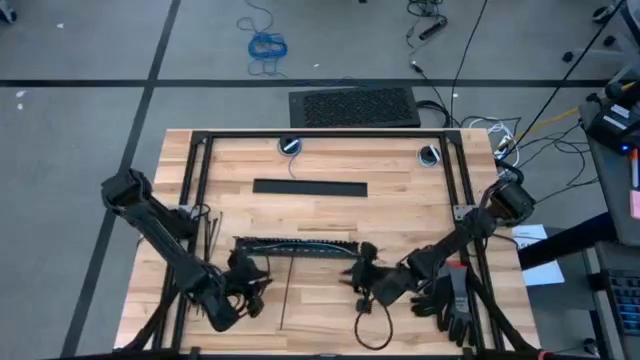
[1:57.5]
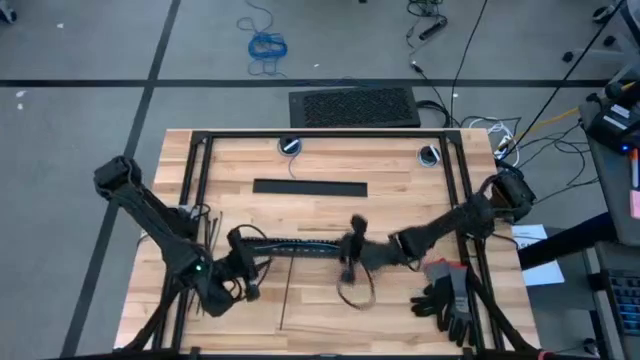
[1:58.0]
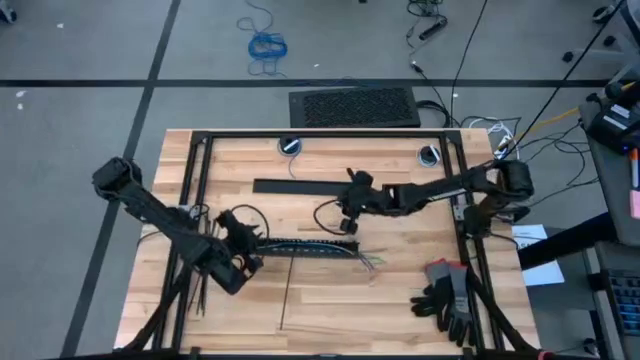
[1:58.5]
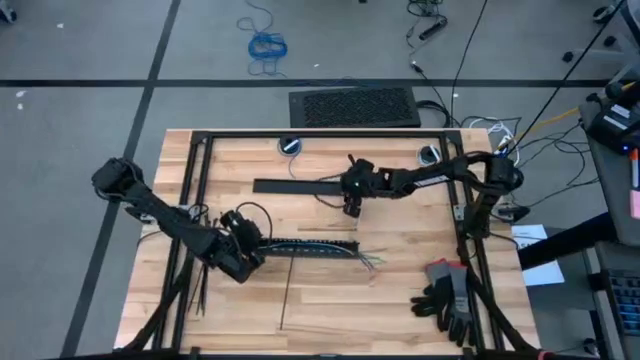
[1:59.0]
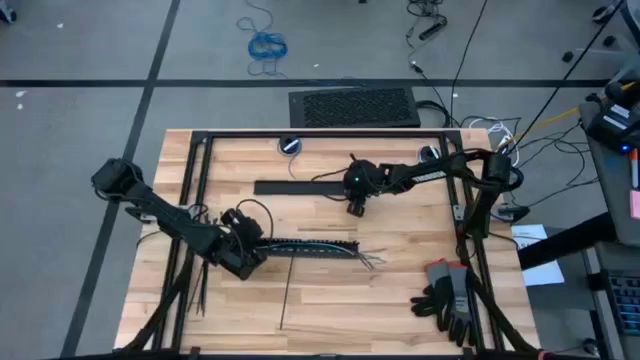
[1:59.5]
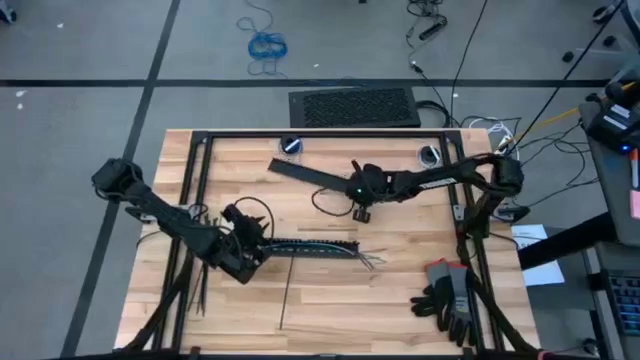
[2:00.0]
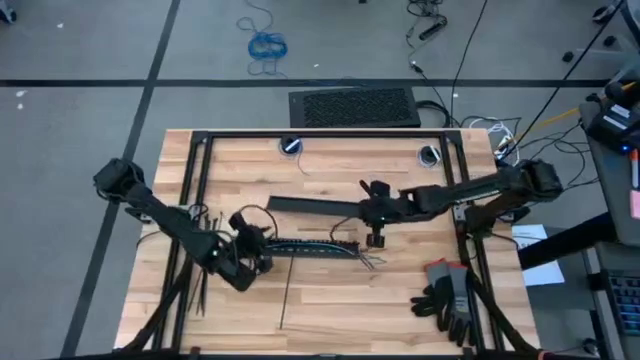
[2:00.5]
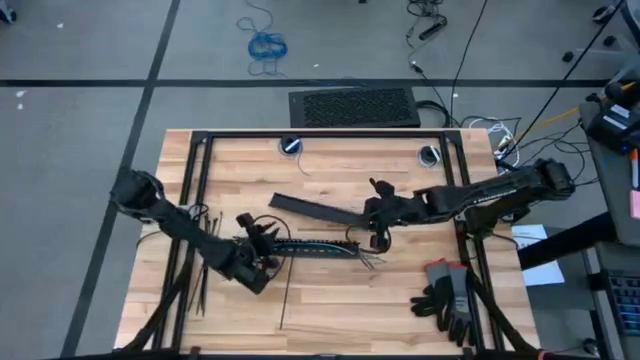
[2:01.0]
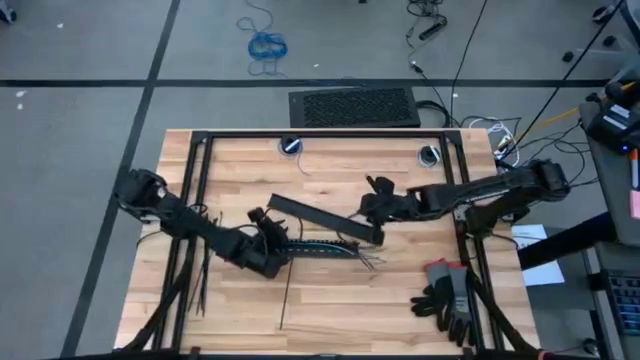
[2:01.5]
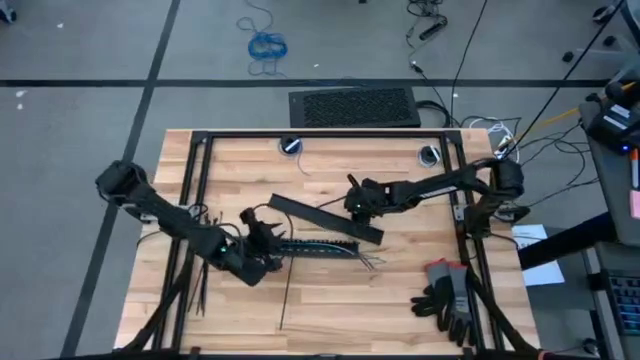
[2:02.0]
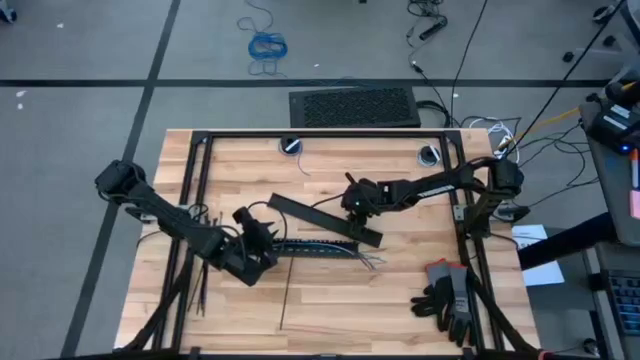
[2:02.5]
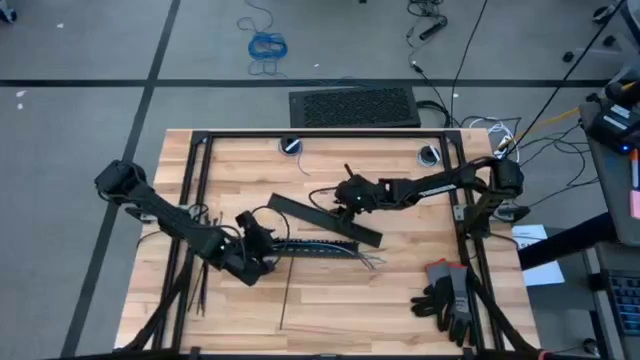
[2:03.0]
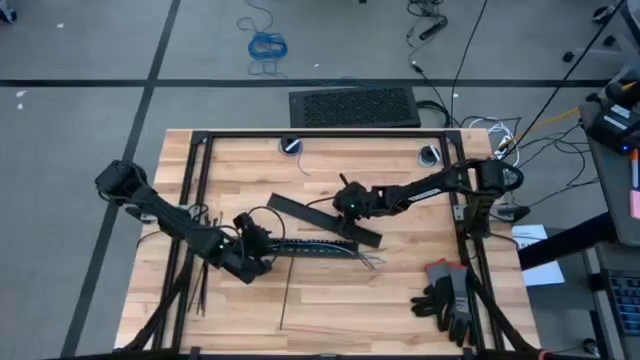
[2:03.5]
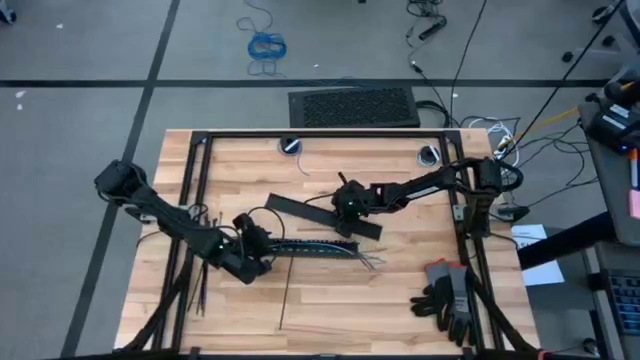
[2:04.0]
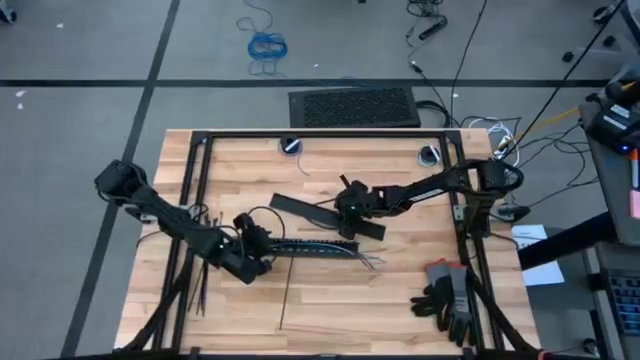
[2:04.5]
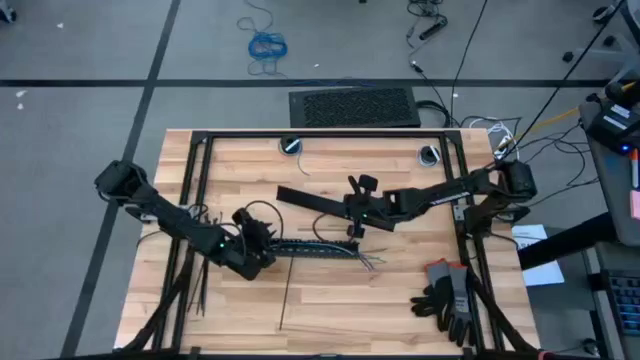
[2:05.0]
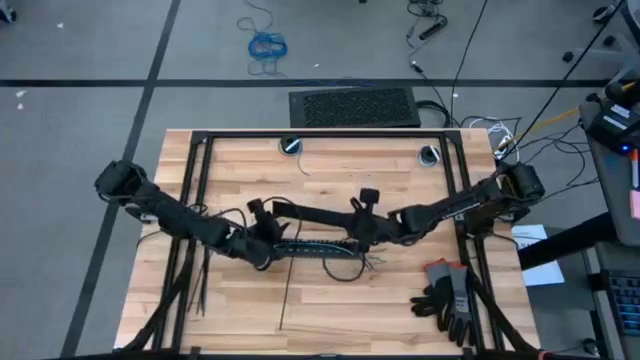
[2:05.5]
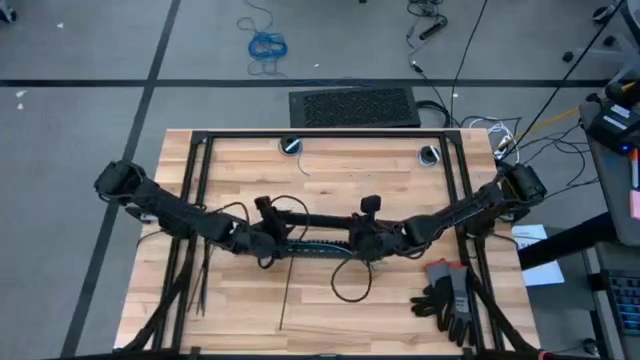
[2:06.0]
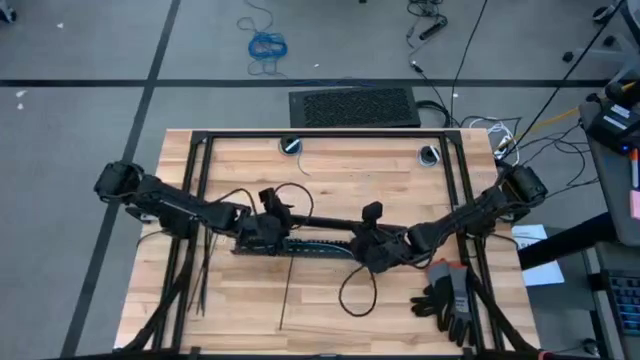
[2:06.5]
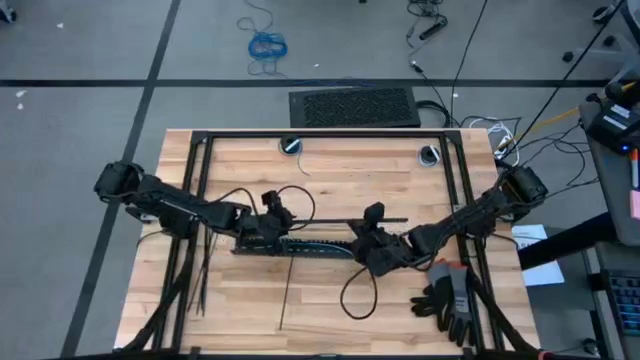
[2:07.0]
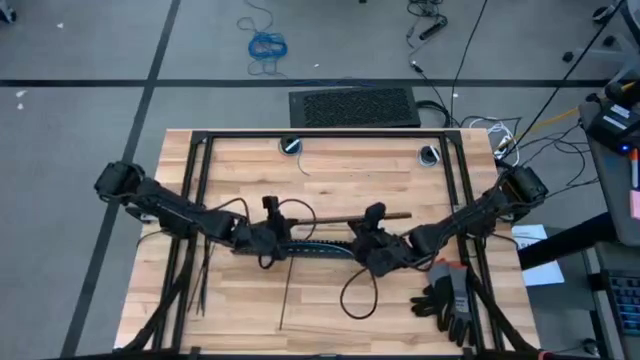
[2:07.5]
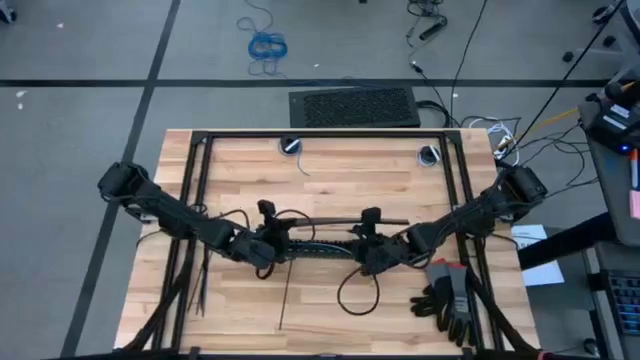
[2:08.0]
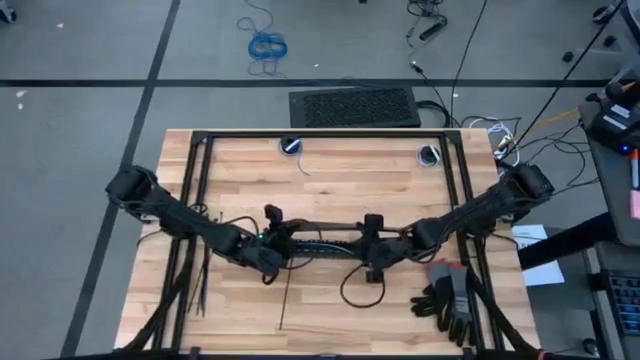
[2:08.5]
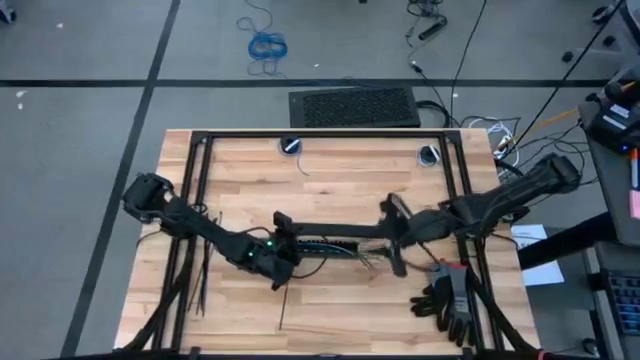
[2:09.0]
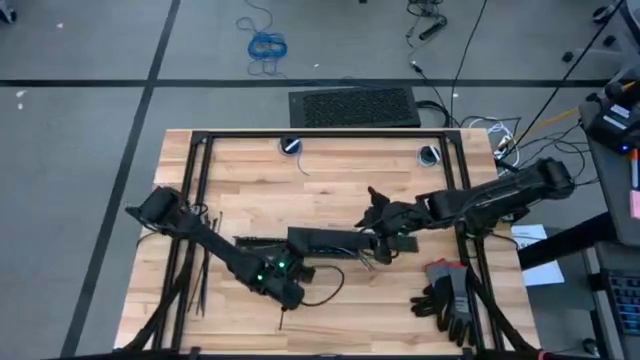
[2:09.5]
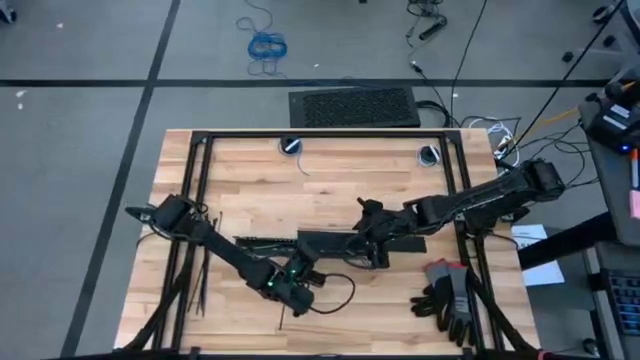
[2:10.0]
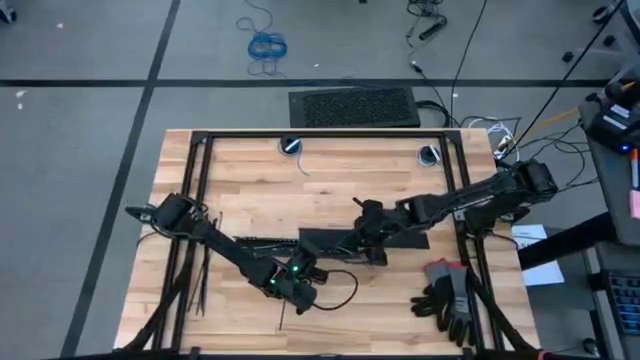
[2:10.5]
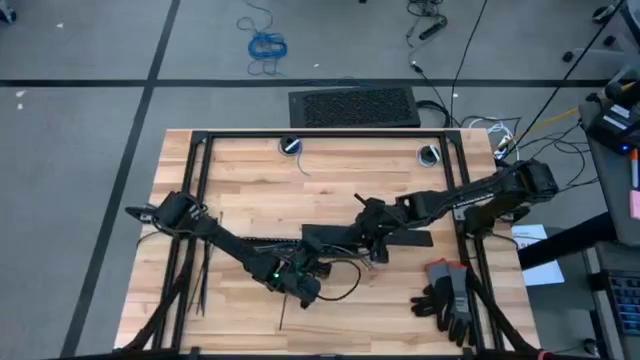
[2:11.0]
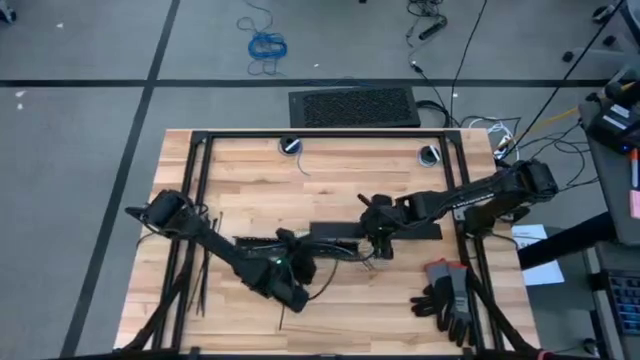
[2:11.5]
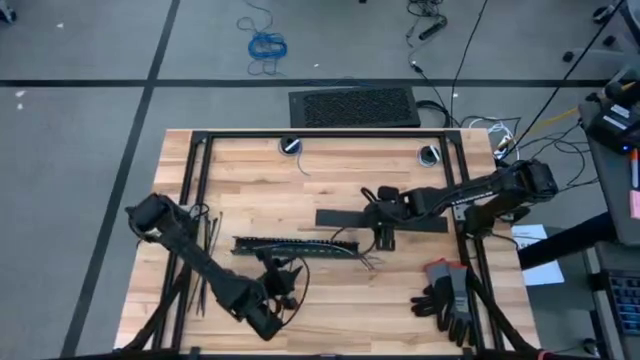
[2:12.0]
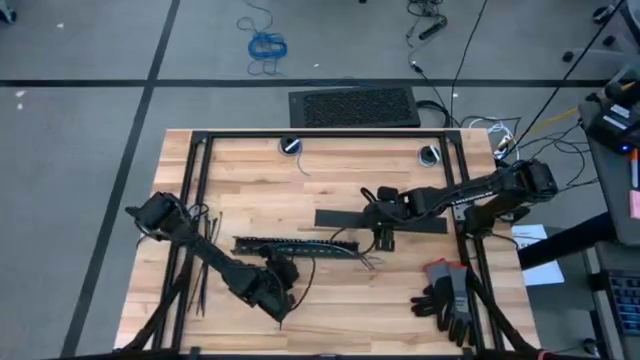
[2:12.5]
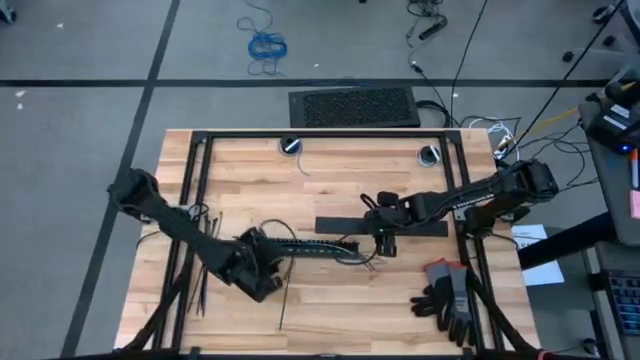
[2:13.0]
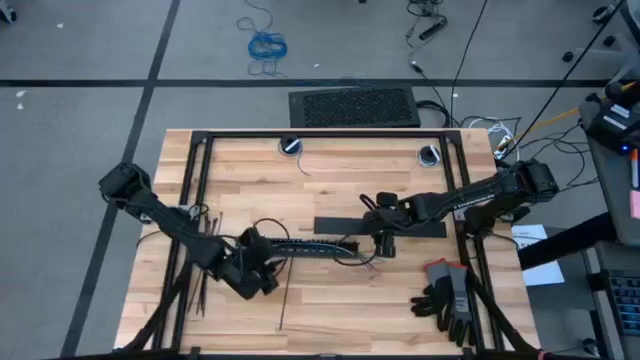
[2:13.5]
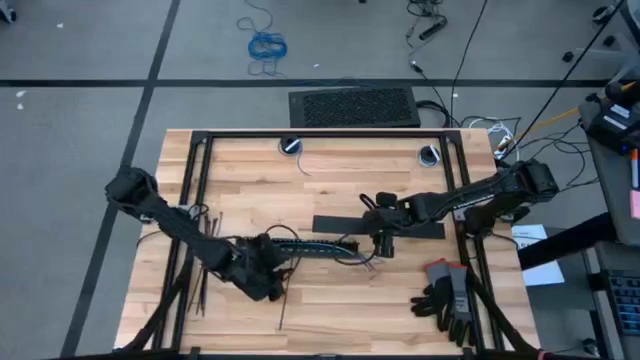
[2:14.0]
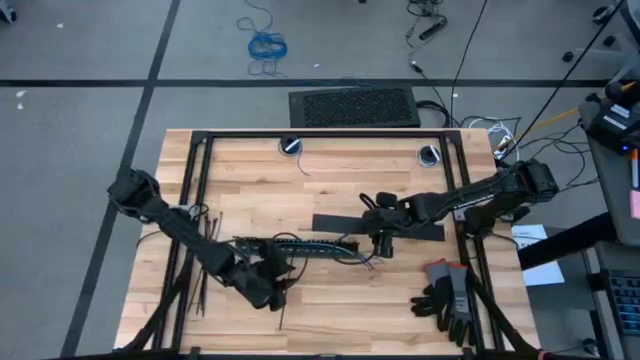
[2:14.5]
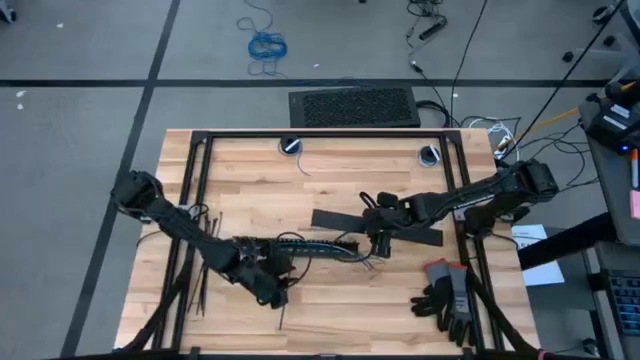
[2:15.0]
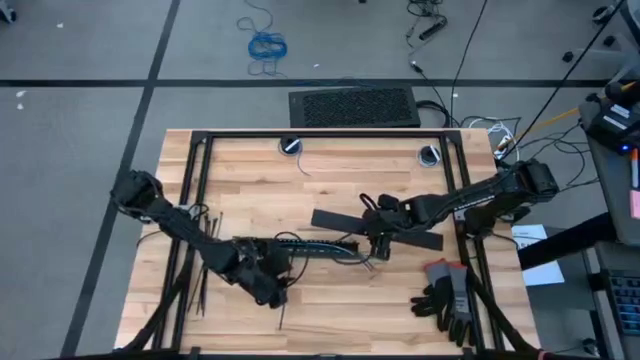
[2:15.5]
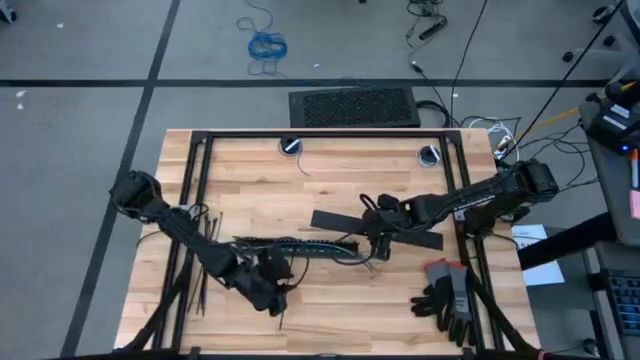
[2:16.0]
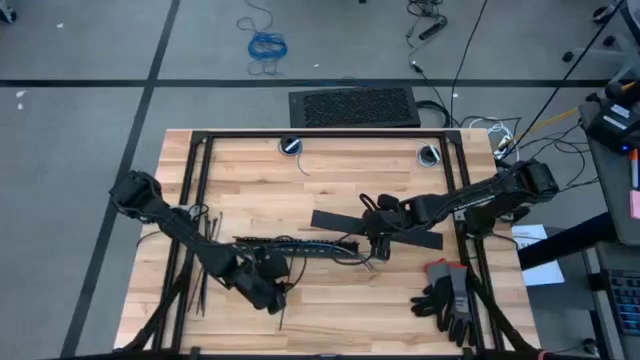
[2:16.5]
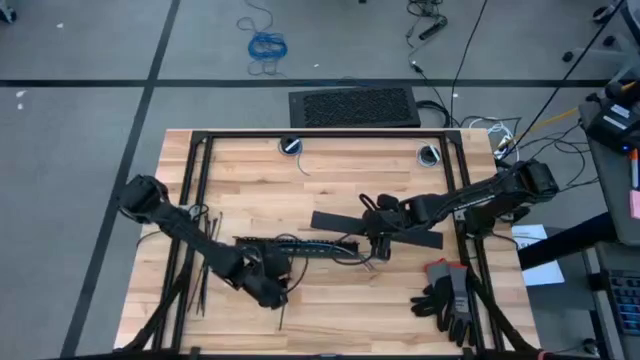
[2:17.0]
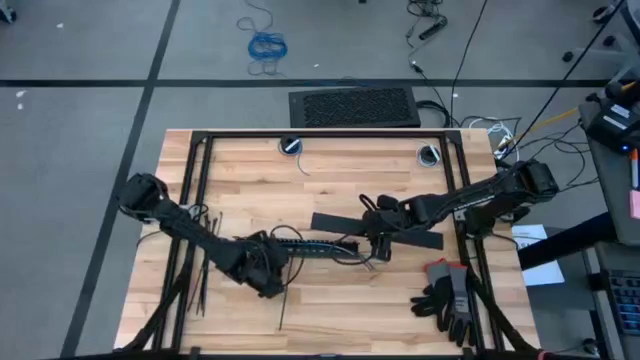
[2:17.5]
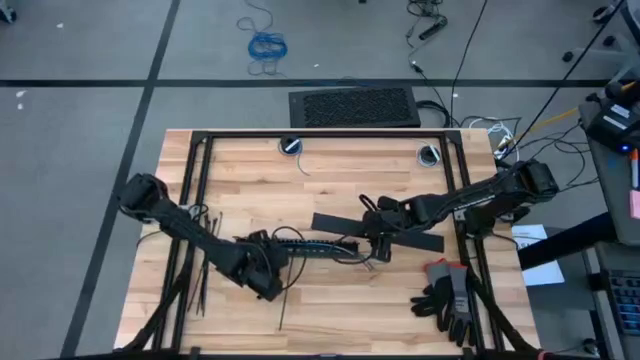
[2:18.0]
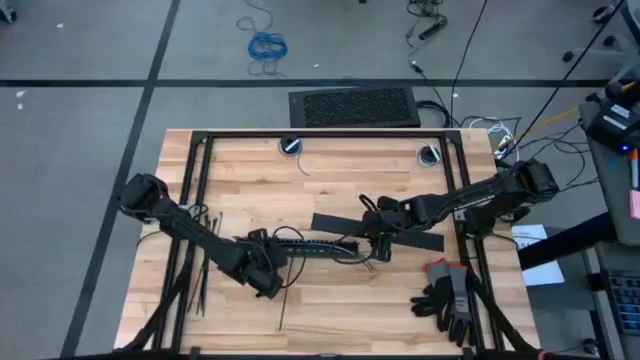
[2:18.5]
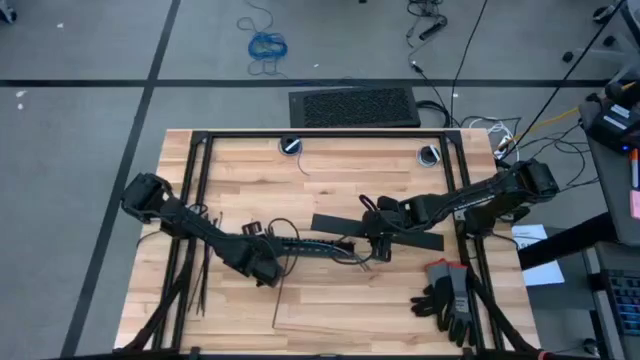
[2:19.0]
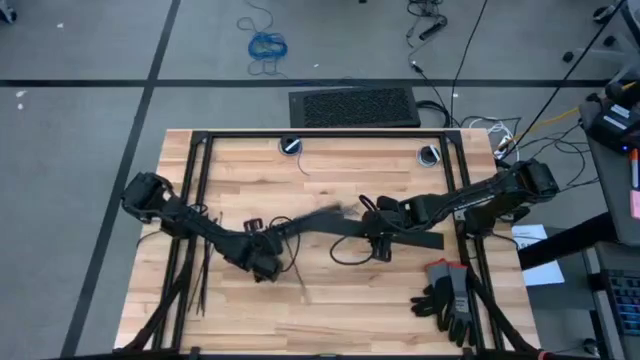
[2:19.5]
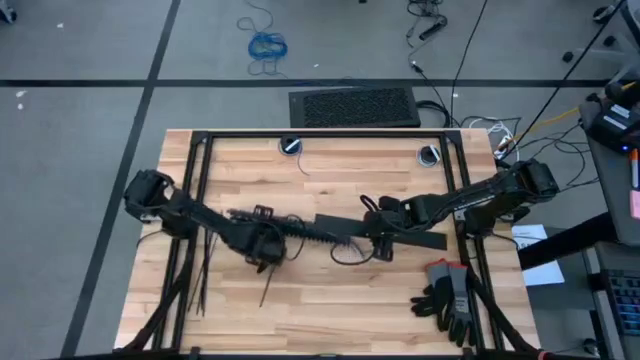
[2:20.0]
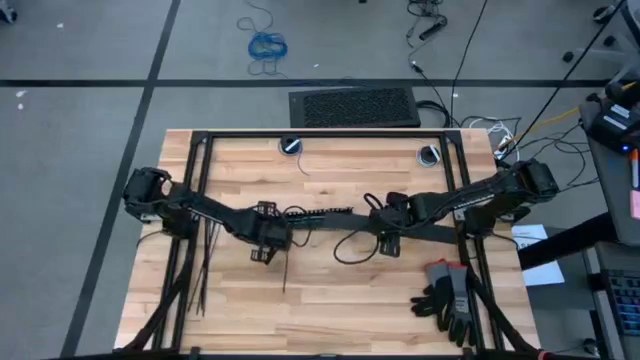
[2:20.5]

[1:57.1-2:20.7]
Task: Ziptie cables
Close the cable duct
